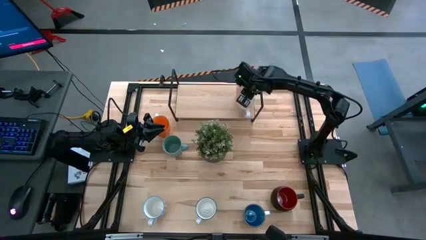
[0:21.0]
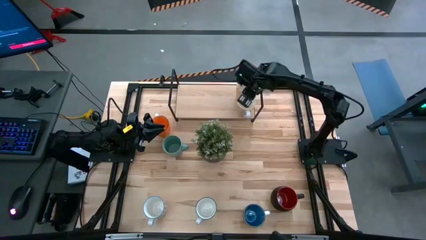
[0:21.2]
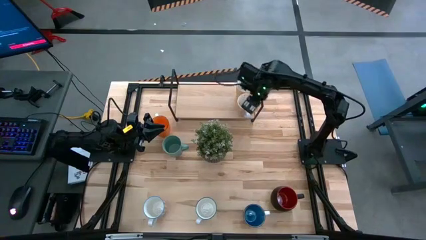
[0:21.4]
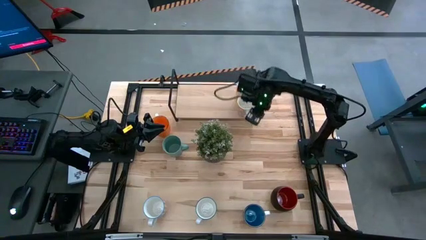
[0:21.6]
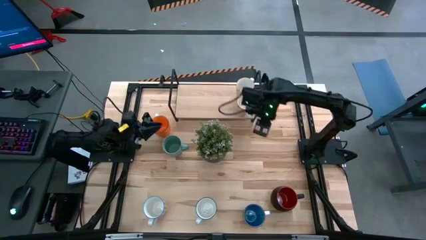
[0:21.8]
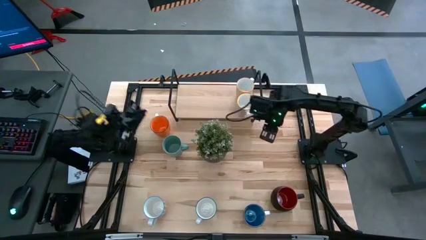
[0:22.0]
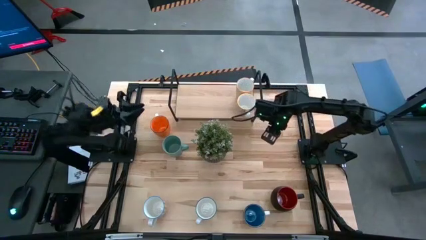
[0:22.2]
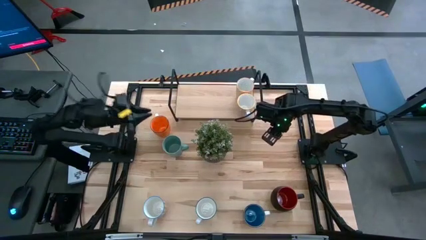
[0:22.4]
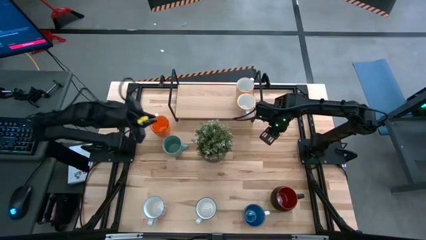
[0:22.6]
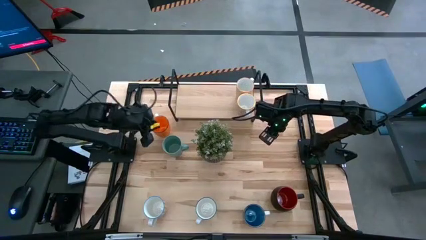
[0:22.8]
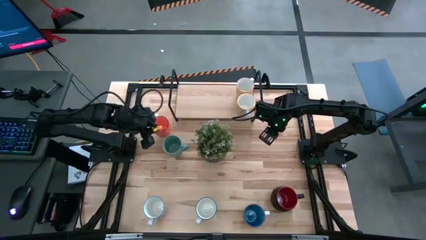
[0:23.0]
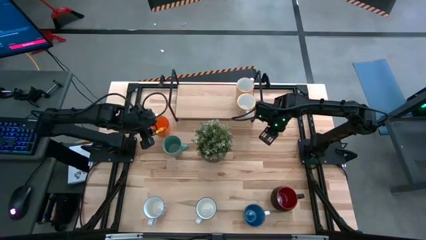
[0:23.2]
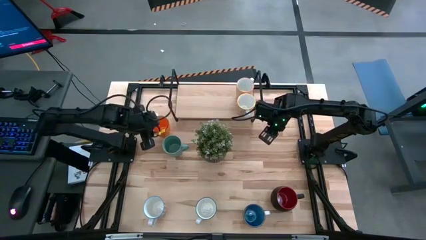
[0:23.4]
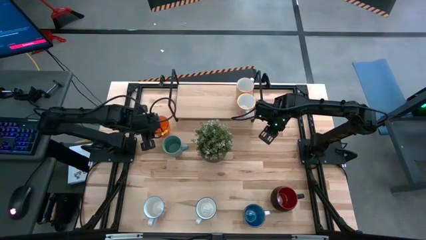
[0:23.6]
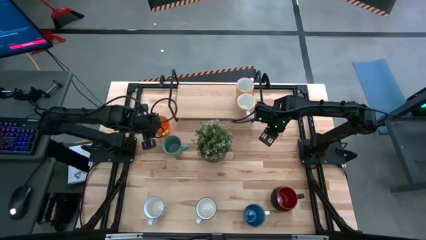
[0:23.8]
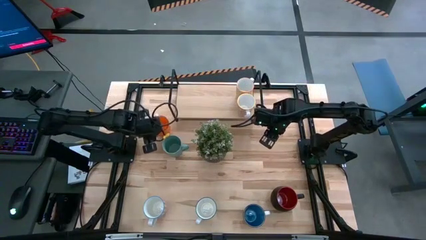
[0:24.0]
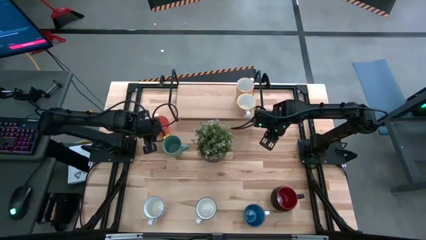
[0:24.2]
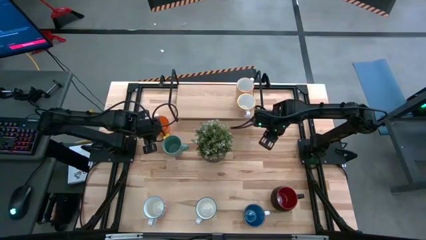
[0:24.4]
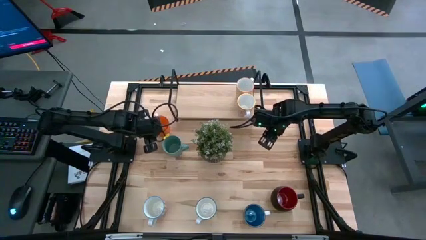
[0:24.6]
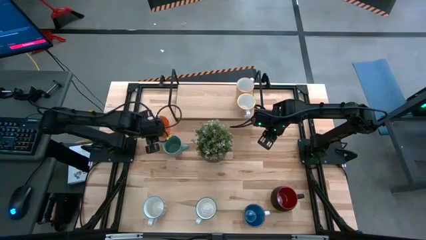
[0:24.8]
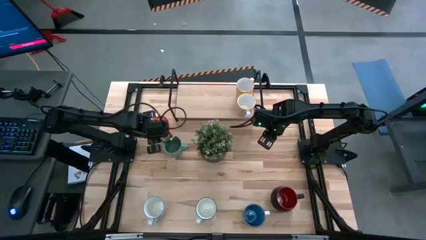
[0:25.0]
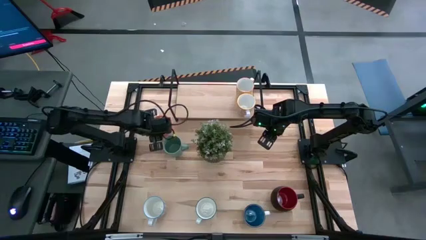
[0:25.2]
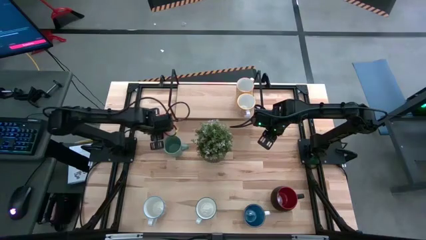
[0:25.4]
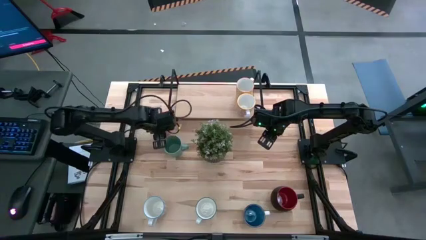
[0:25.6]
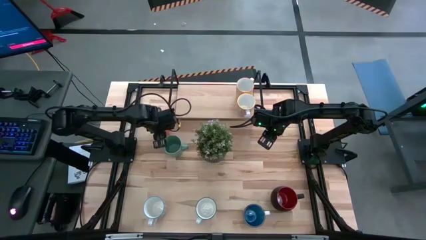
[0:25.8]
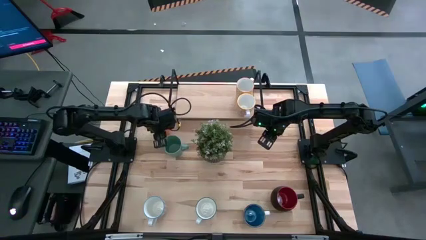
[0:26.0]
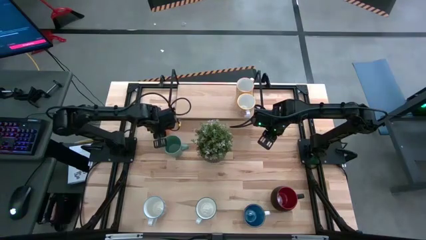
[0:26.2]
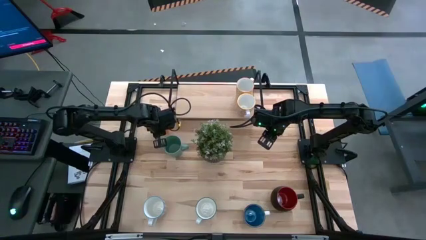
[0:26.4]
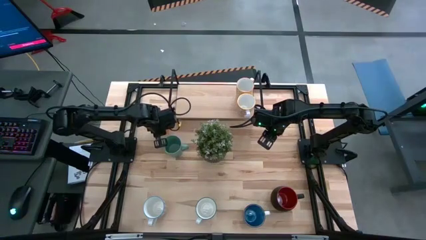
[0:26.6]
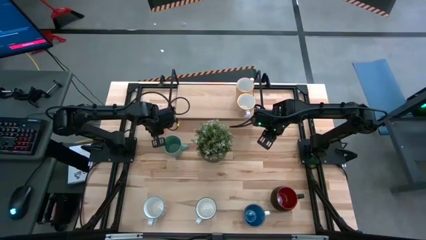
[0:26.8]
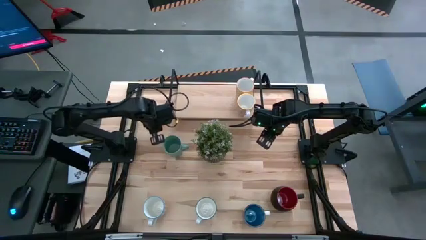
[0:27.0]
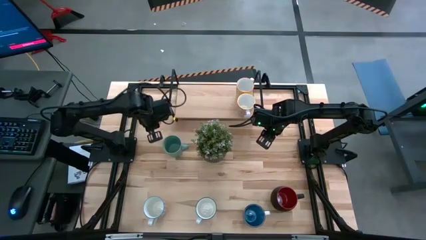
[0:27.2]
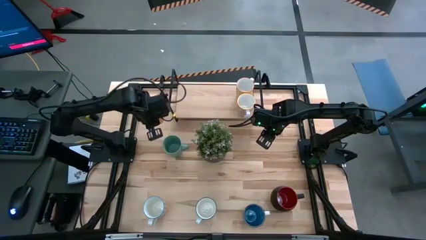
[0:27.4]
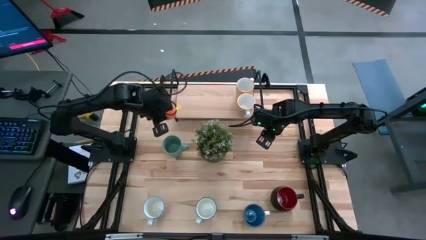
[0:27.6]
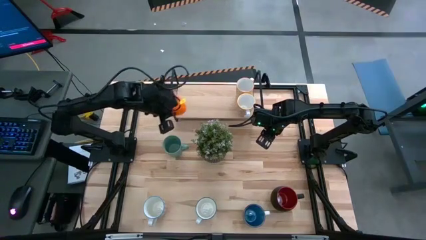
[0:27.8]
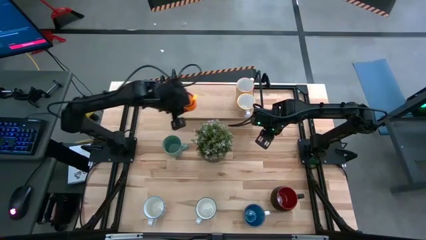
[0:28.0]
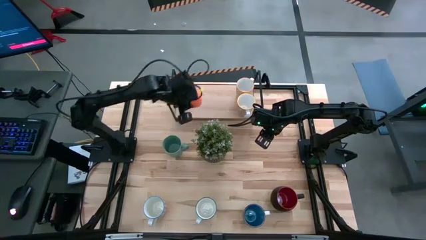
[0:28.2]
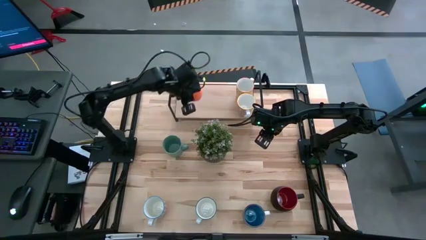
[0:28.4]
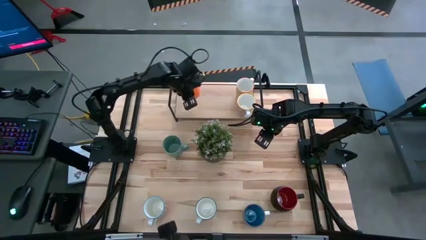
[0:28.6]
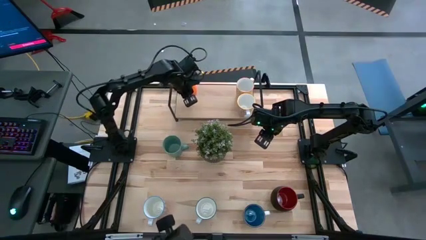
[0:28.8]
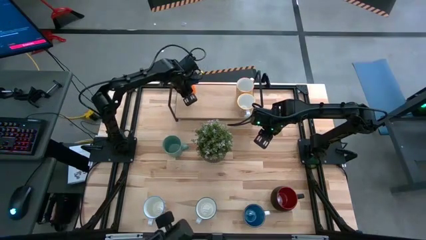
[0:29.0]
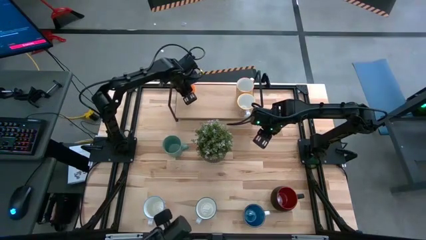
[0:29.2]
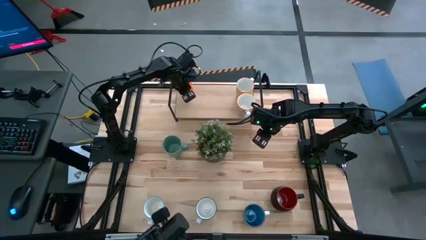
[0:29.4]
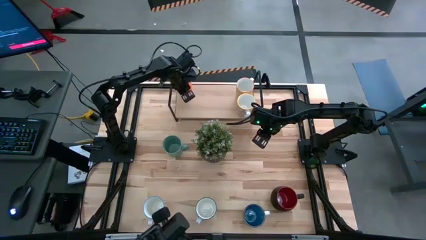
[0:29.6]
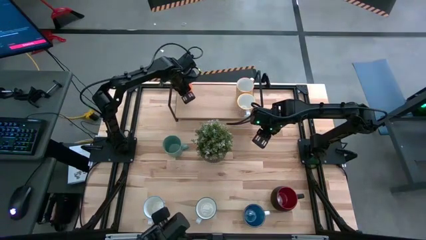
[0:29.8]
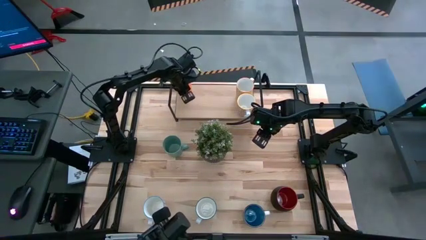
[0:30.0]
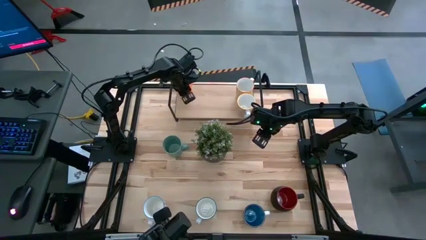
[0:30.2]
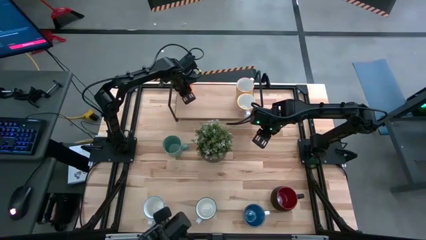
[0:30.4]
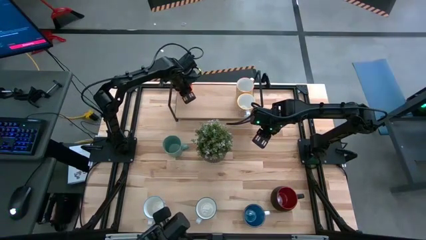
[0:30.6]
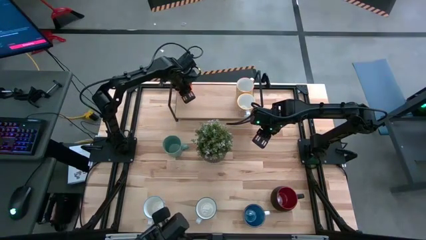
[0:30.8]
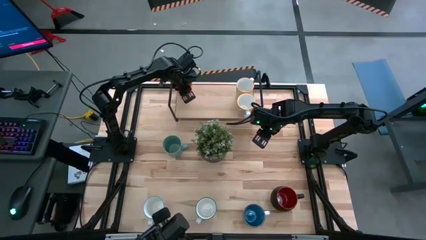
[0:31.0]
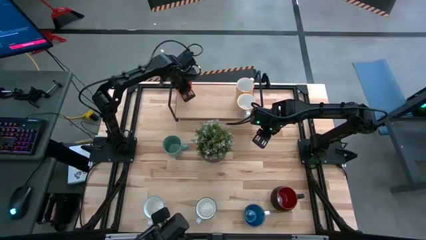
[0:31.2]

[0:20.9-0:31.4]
Task: Place coffee mugs
Put the orange mug on the shelf

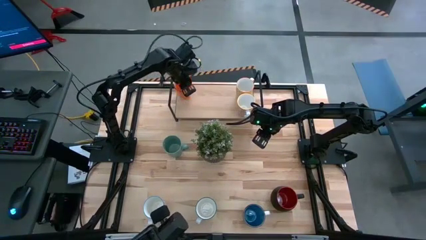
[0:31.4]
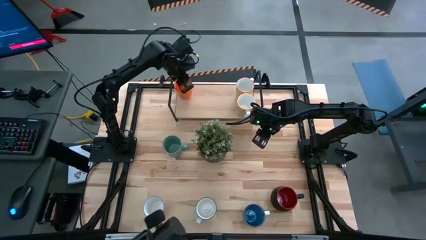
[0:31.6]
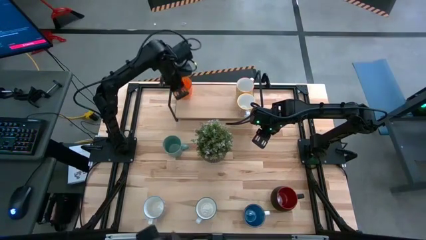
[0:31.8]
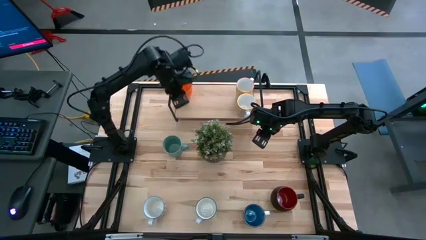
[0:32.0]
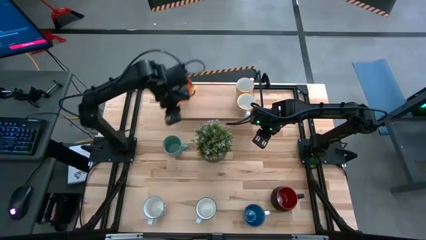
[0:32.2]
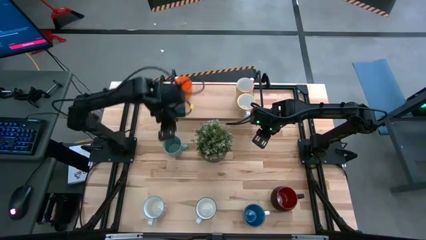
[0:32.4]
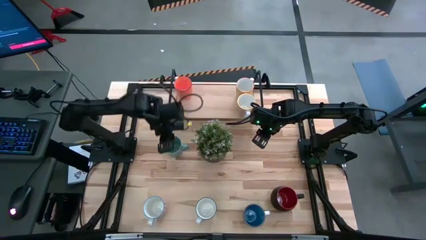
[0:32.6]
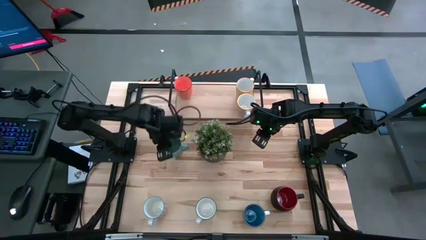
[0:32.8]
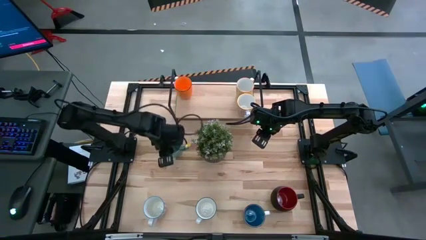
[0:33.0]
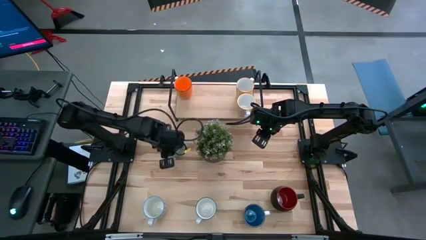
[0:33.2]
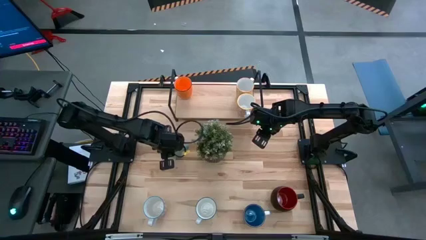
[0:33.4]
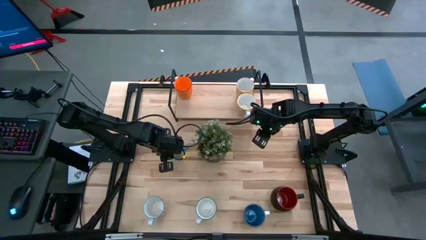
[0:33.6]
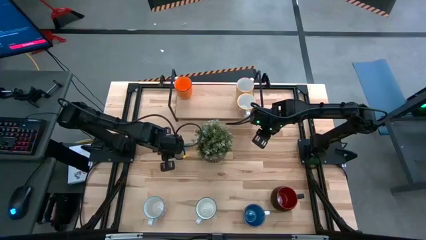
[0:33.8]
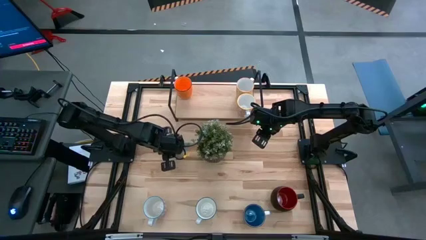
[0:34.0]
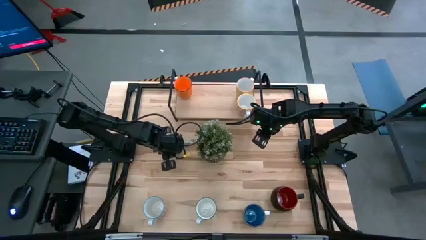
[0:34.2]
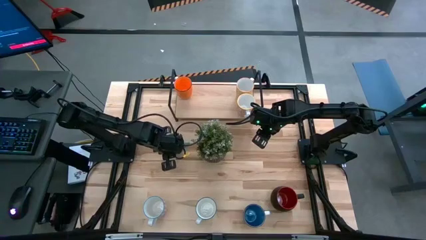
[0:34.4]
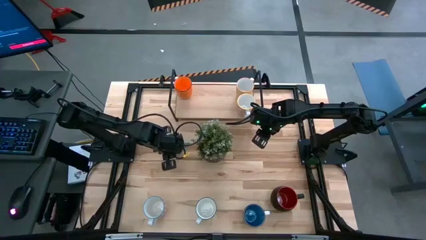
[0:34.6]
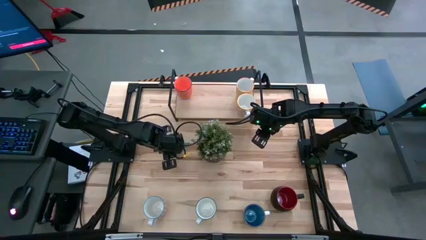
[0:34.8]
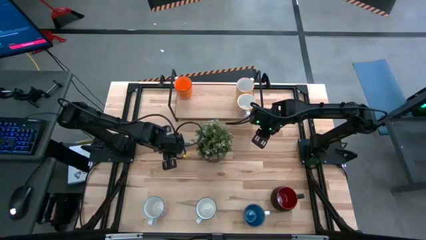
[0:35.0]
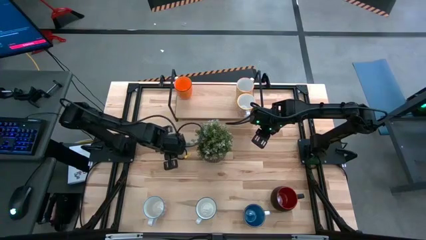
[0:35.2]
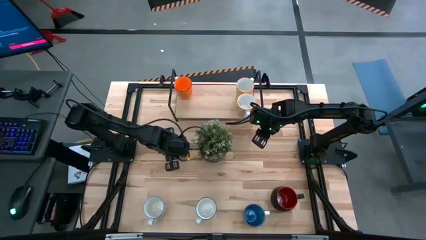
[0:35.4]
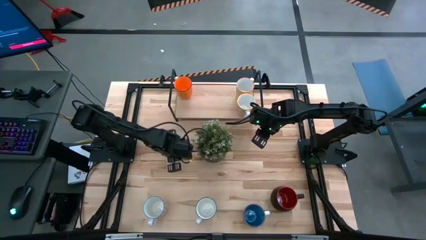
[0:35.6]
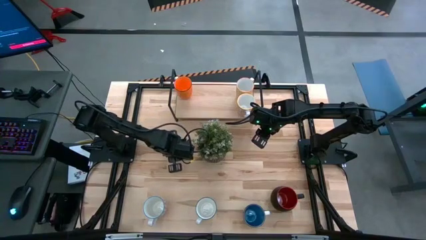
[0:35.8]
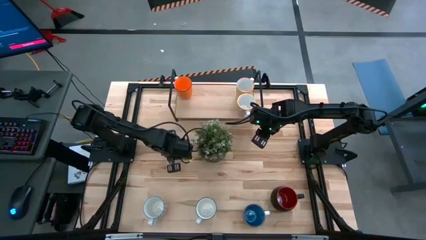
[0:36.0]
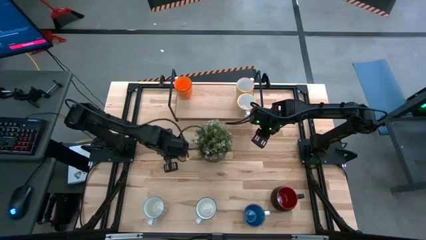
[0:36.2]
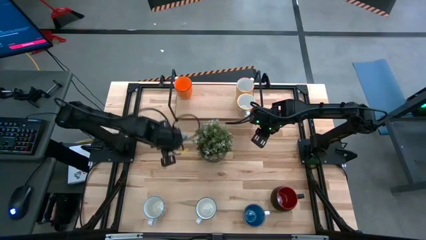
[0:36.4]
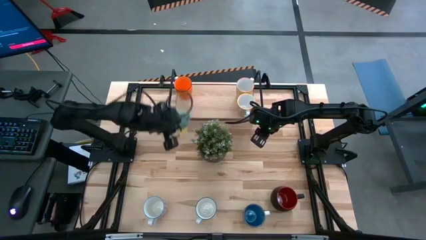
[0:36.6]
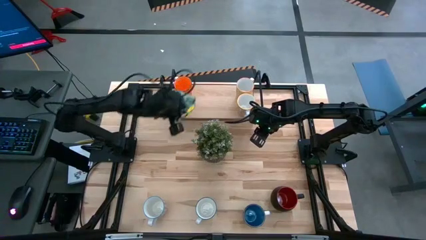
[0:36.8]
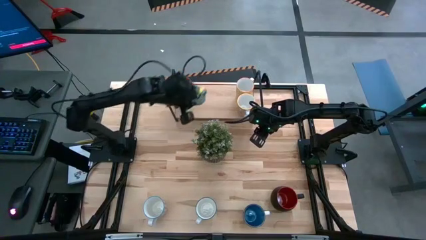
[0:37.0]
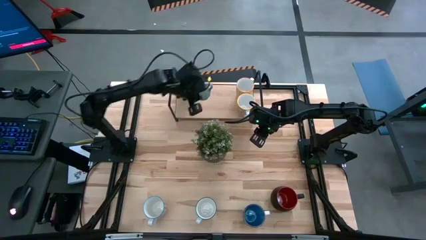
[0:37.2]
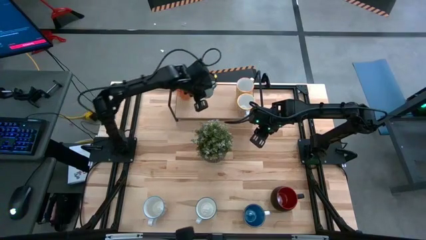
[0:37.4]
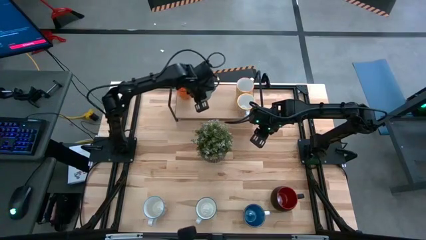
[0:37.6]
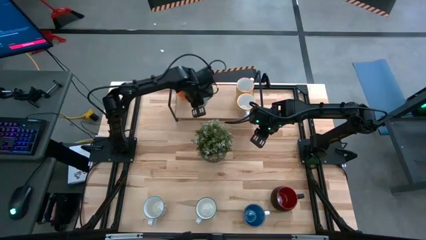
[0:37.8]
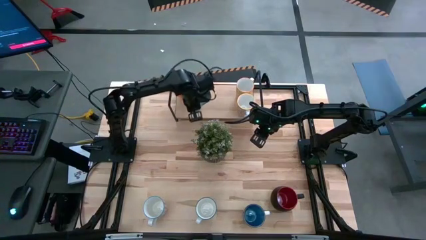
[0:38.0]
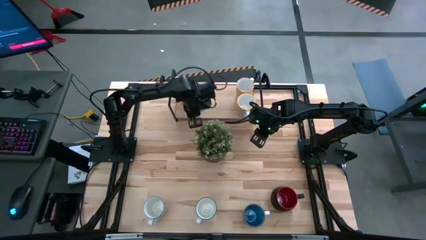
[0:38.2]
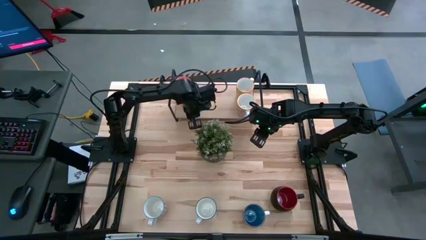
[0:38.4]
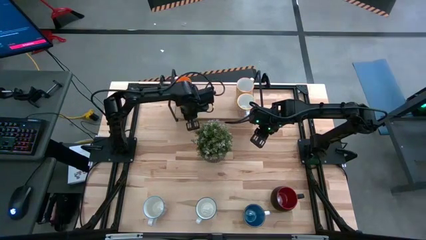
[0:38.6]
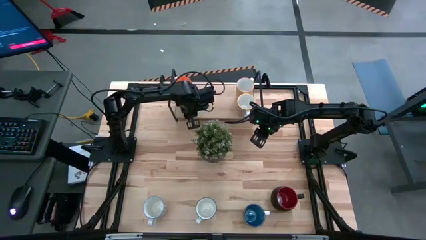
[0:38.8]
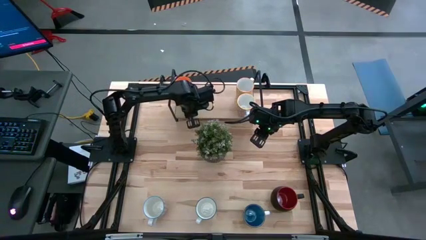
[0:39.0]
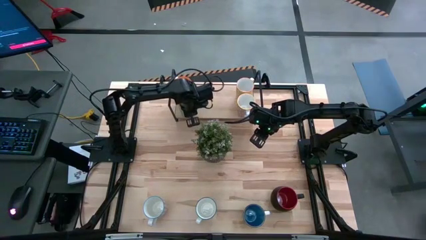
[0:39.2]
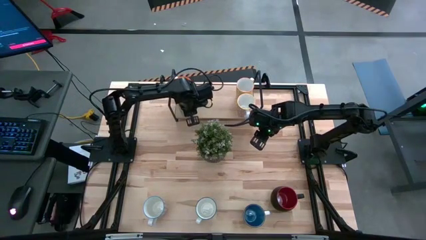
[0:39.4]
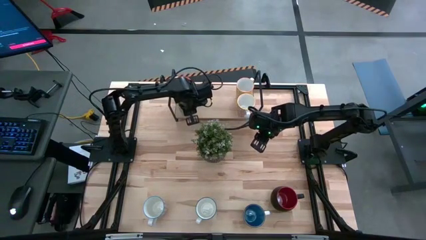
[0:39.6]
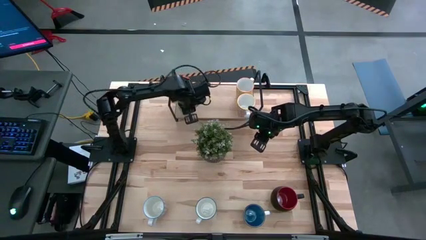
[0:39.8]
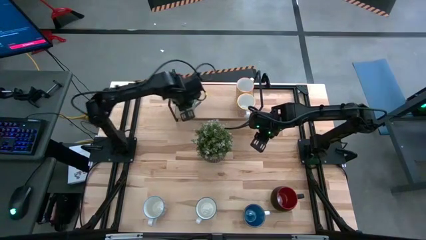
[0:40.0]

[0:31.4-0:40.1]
Put the green mug on the shelf
